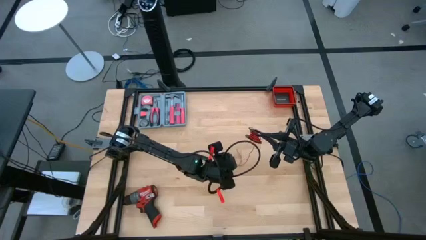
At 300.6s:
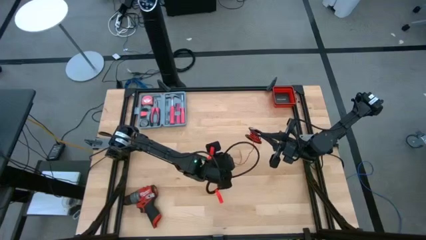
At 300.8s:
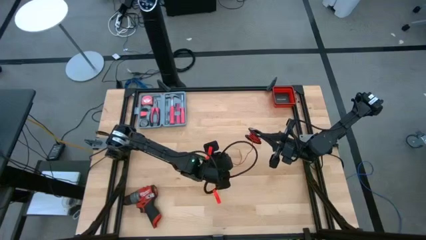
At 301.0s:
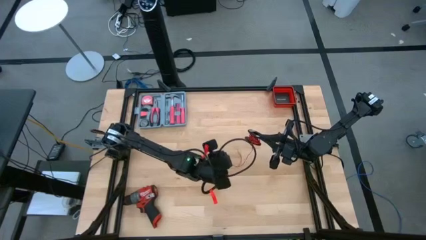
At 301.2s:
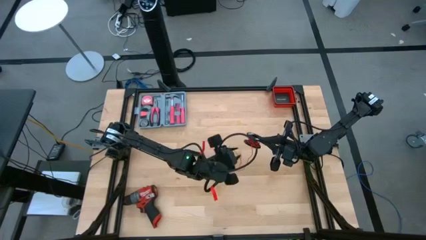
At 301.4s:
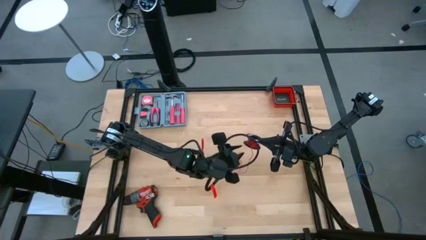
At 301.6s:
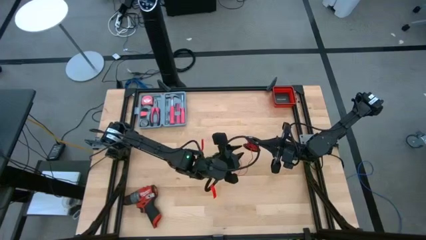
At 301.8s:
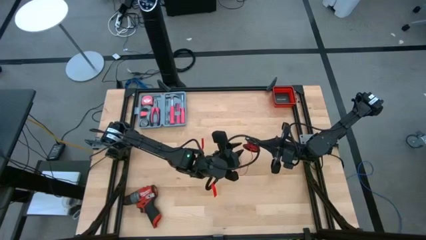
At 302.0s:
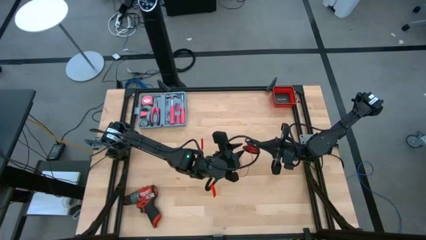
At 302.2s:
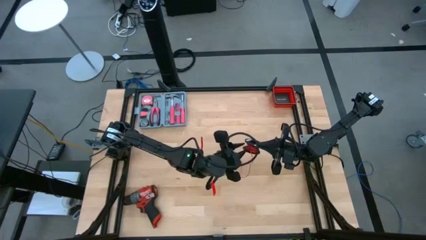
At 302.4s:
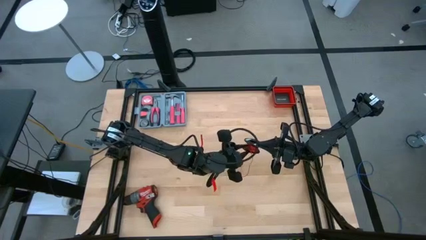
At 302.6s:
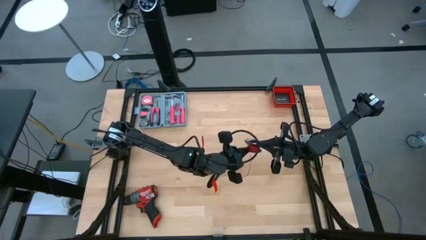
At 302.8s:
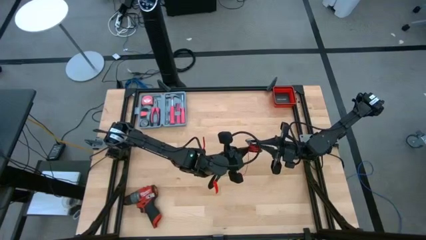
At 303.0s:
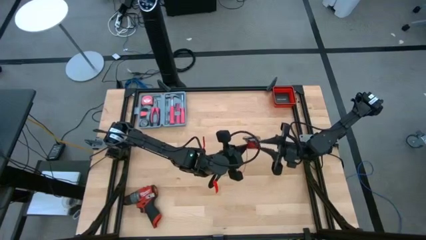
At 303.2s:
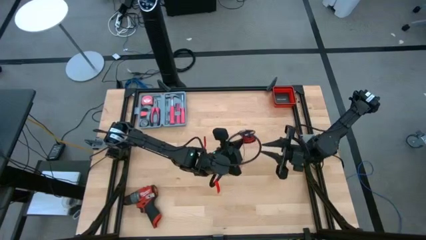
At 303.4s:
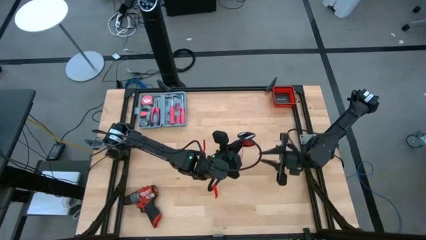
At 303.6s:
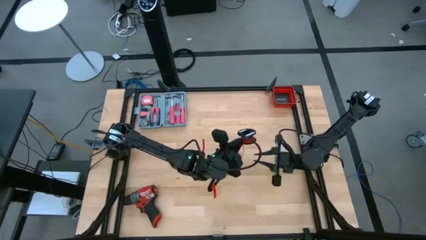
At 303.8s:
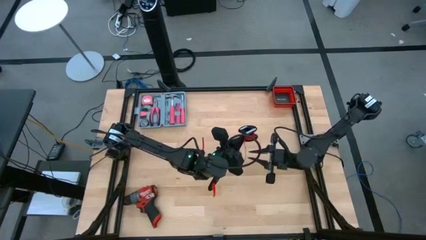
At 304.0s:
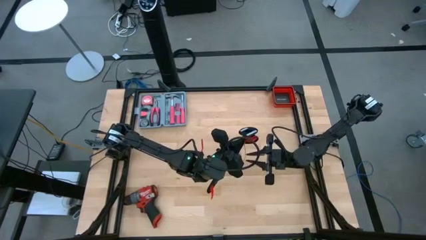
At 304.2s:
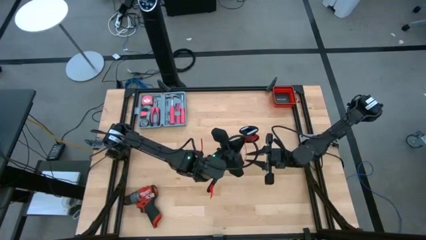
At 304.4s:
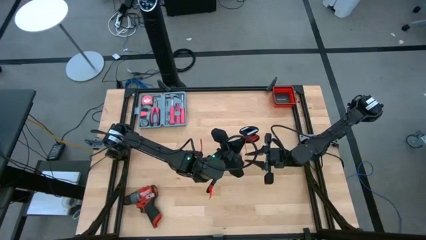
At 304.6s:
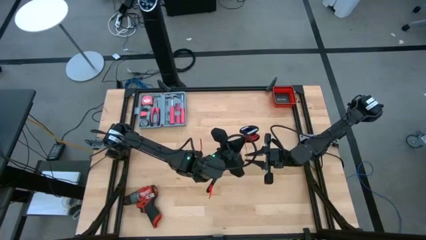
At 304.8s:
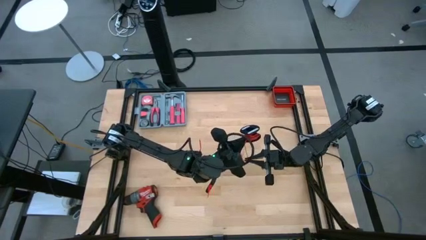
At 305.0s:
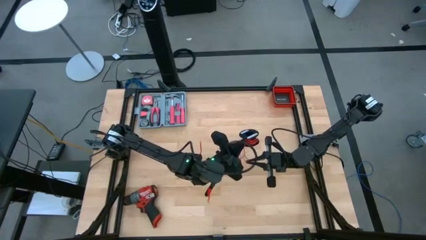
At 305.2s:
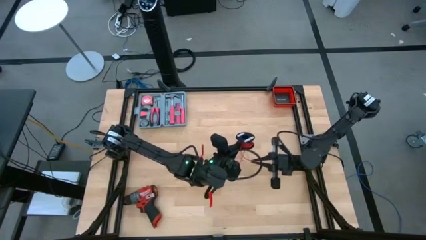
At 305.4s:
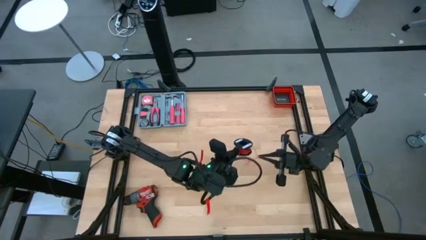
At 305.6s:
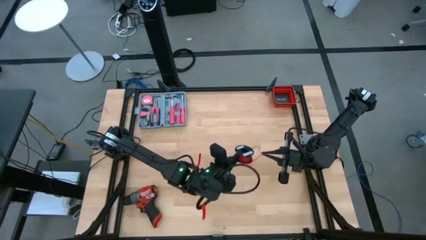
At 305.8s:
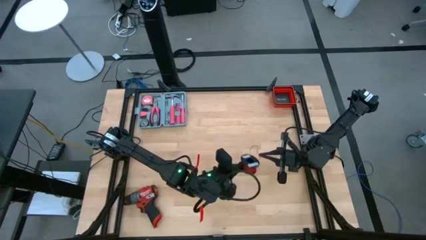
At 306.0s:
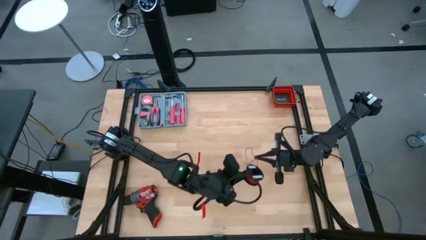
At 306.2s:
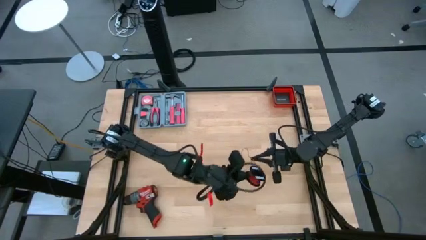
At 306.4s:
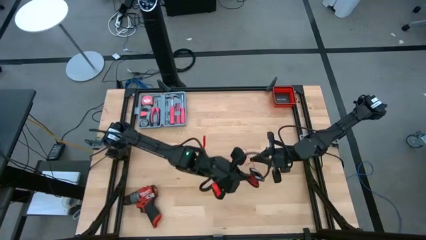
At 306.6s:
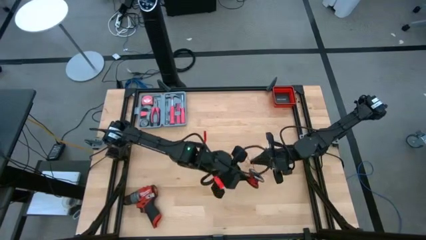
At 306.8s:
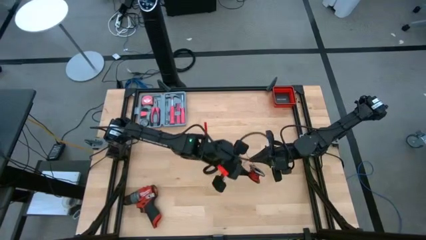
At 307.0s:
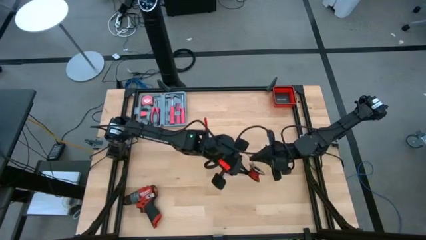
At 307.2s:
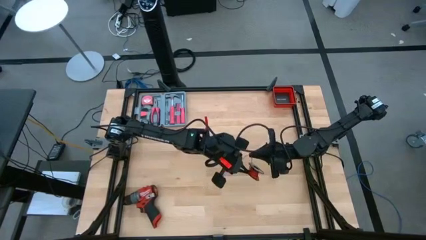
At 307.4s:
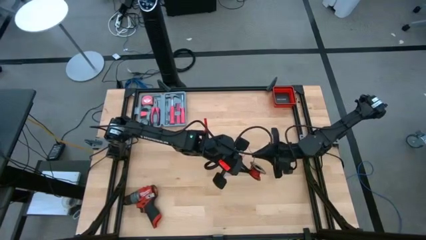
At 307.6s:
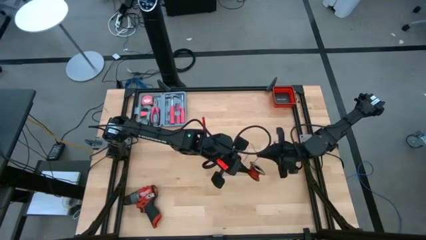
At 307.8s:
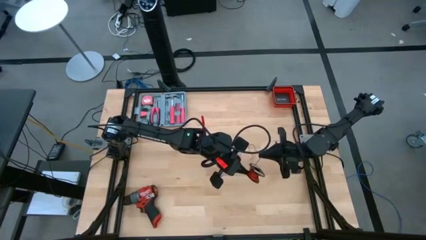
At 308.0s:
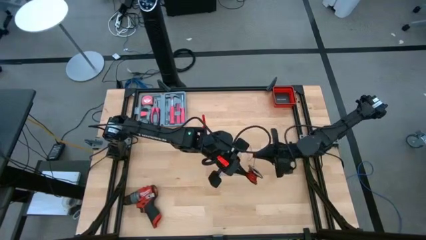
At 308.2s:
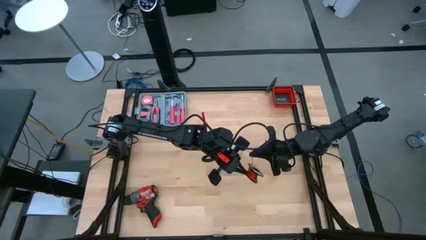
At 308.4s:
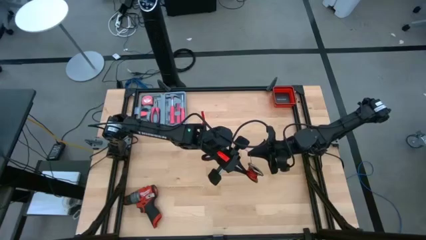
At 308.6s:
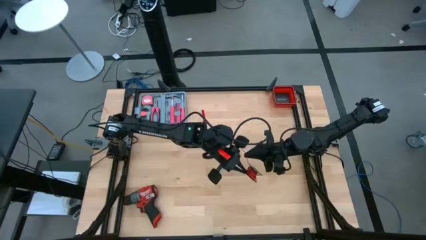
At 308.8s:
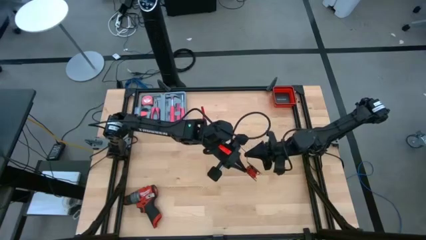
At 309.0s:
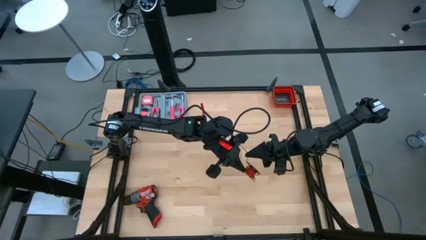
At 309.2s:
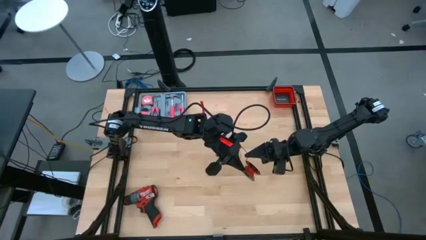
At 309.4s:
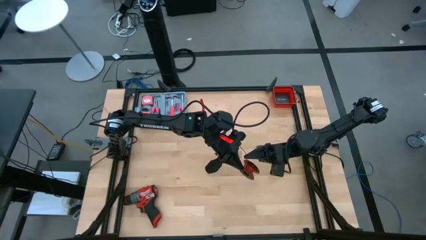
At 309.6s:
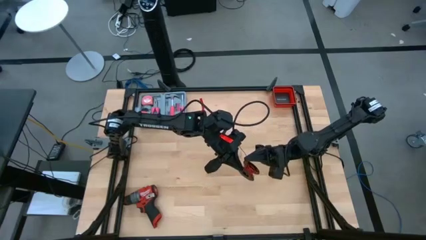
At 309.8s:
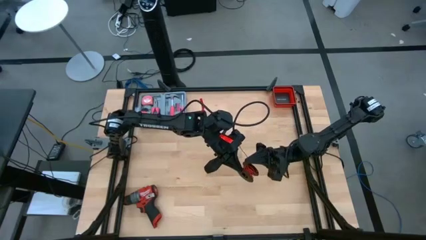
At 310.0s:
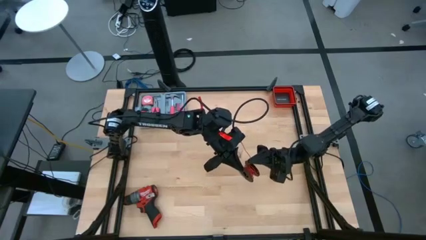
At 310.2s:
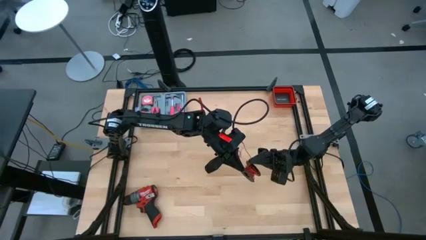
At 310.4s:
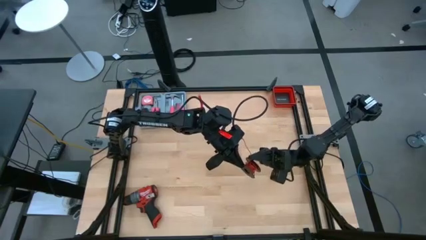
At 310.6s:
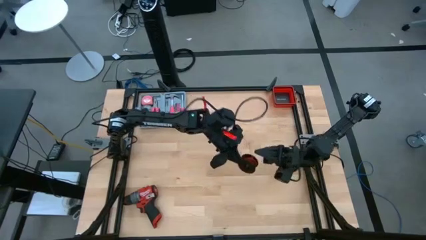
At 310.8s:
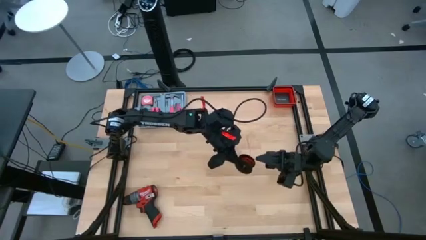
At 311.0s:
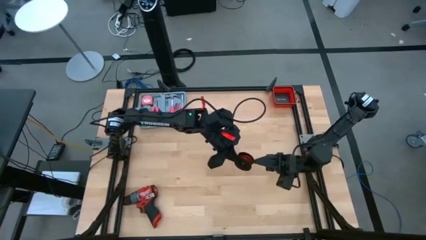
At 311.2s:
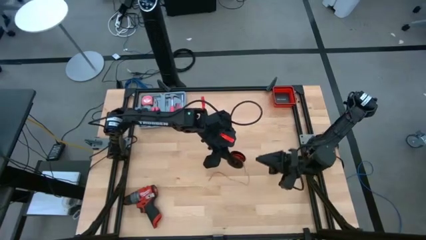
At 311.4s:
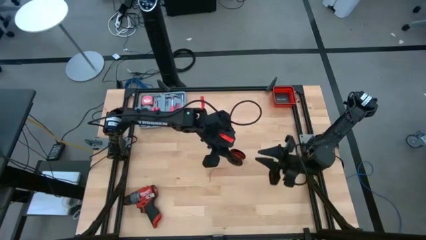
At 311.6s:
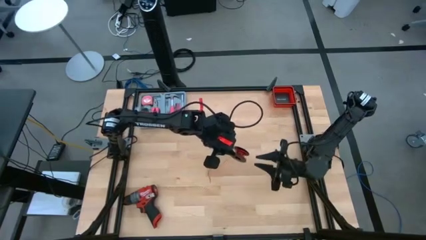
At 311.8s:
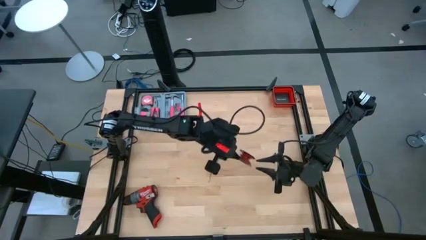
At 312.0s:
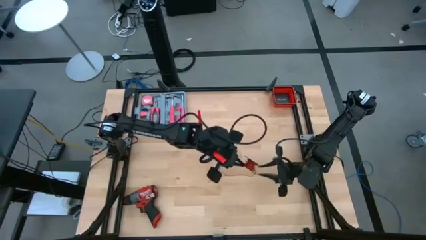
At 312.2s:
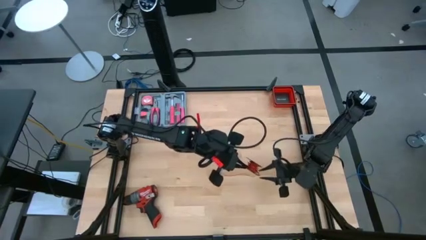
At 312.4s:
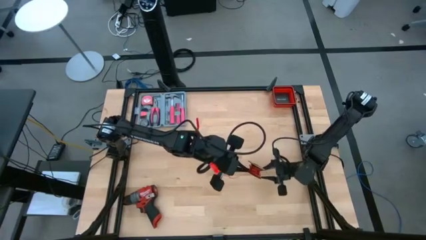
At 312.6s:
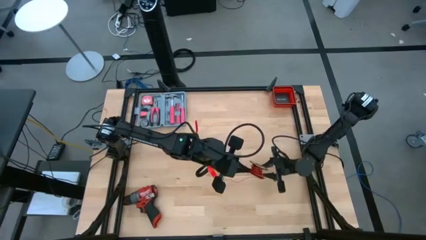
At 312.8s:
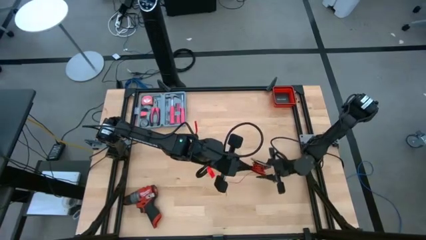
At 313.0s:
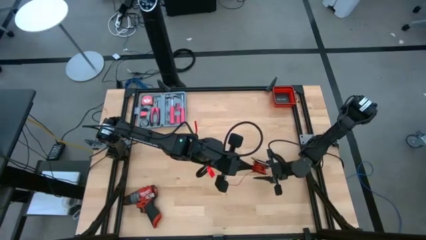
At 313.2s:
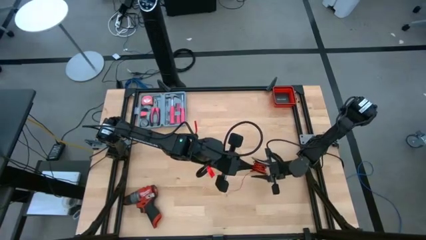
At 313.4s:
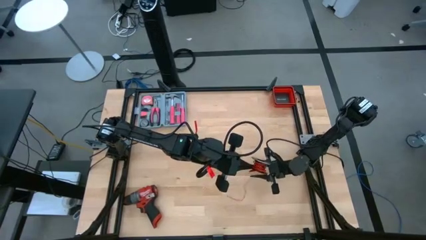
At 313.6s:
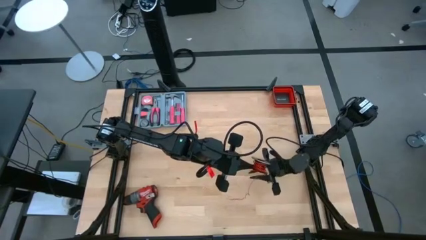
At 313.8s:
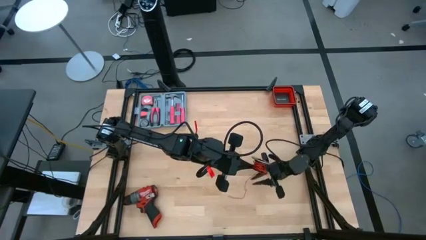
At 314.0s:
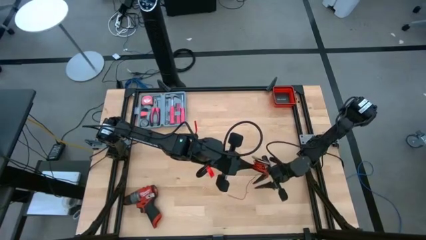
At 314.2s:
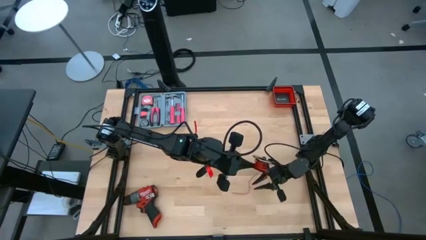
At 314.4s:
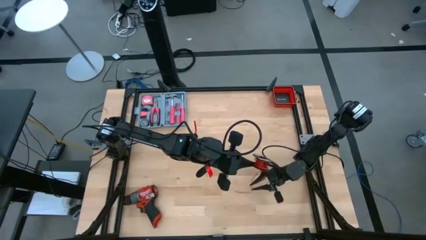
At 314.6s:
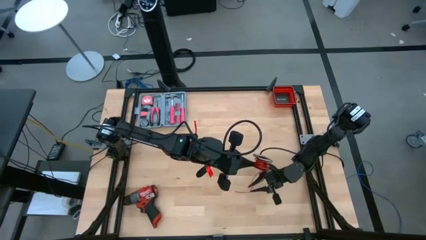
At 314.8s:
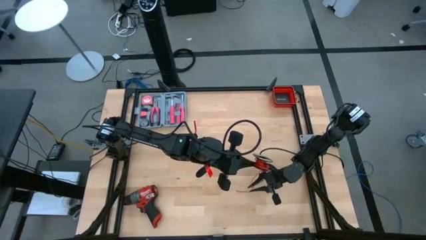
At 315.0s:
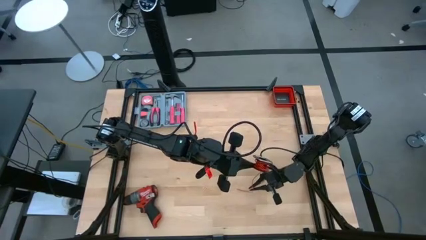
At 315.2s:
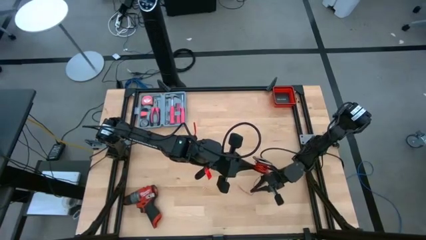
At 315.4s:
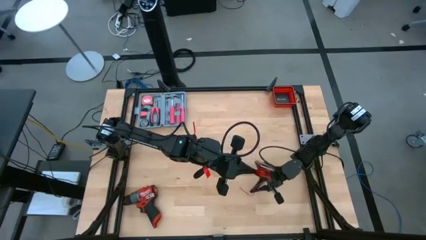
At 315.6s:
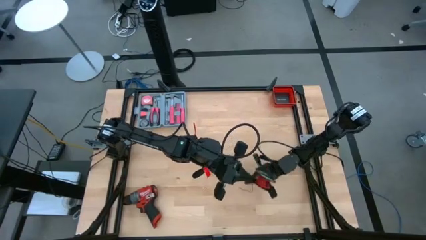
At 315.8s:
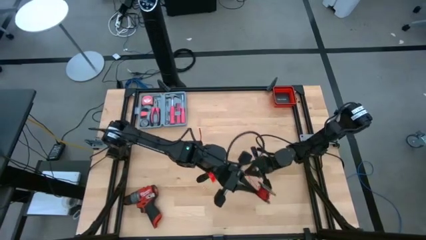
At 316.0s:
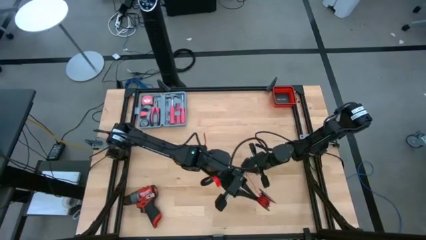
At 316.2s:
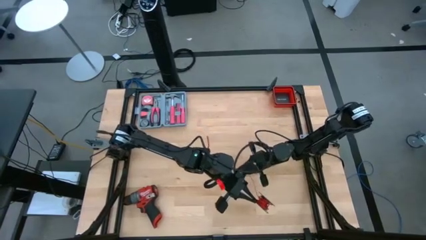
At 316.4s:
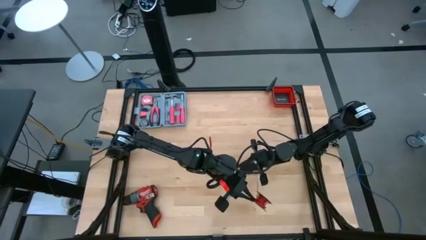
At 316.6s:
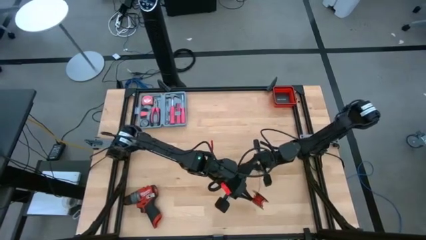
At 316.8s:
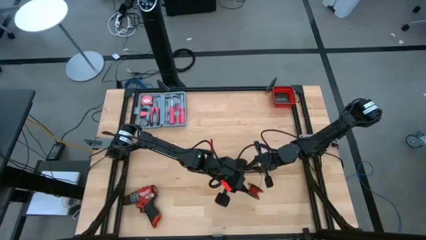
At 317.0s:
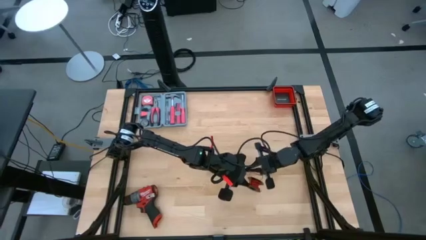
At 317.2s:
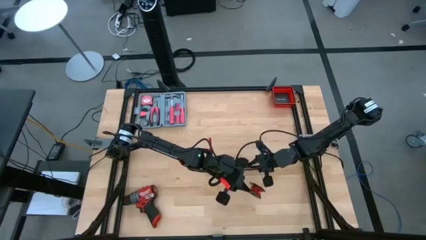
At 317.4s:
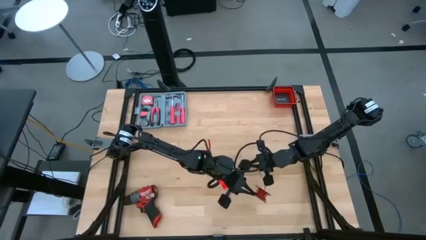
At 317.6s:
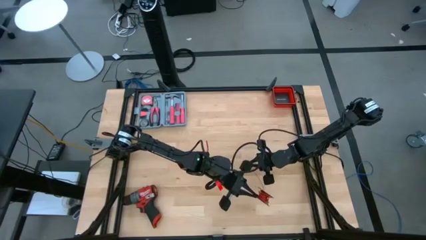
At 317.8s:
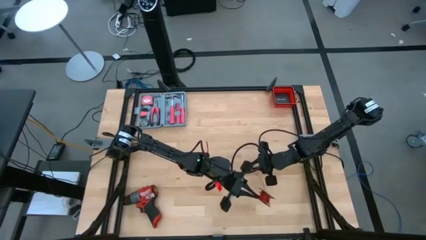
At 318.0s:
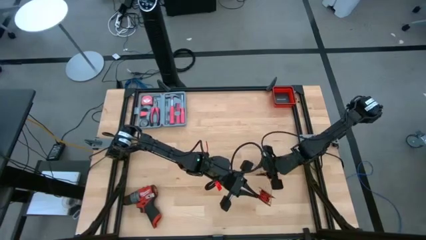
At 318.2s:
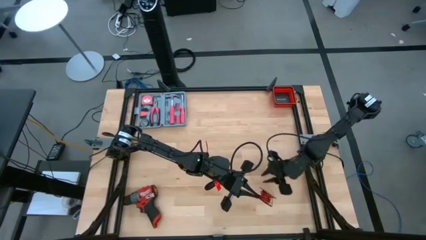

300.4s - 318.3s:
Task: Coil cords
Coil the red wire on the black spool
